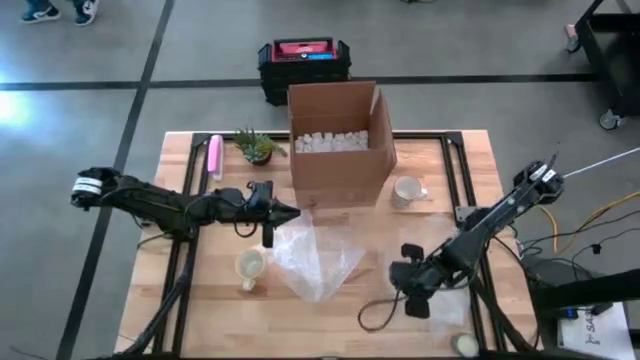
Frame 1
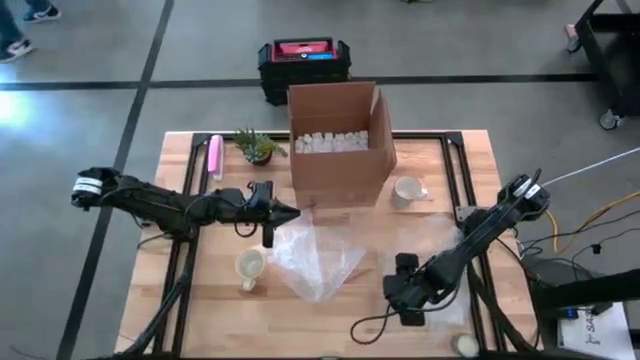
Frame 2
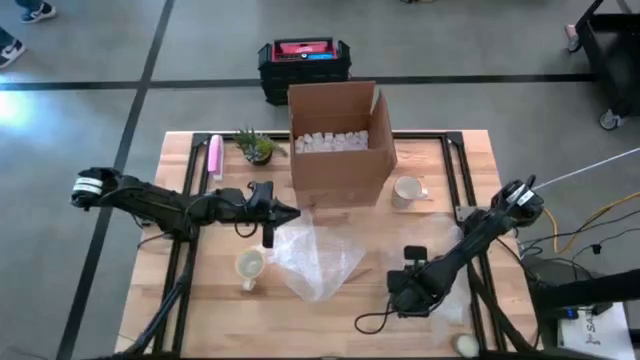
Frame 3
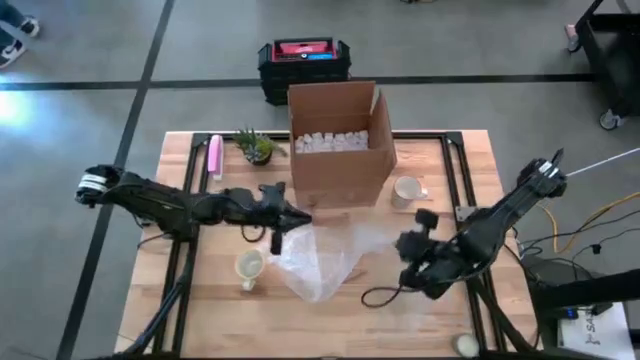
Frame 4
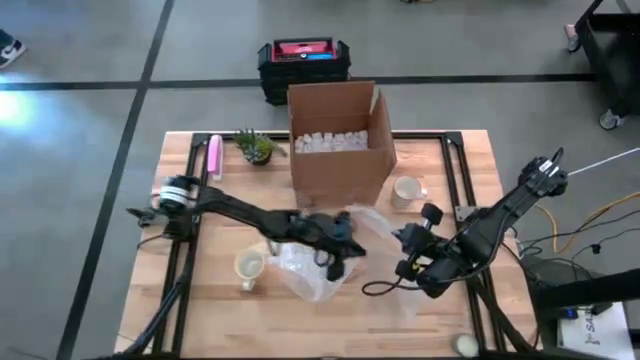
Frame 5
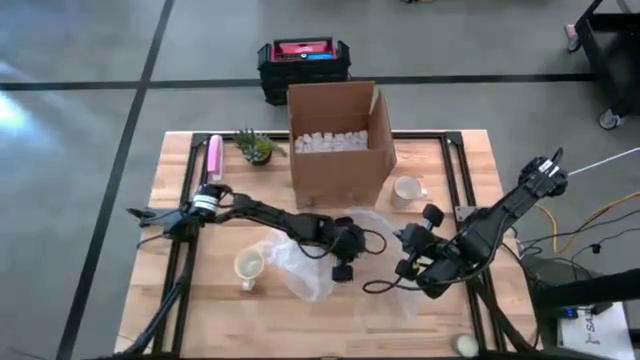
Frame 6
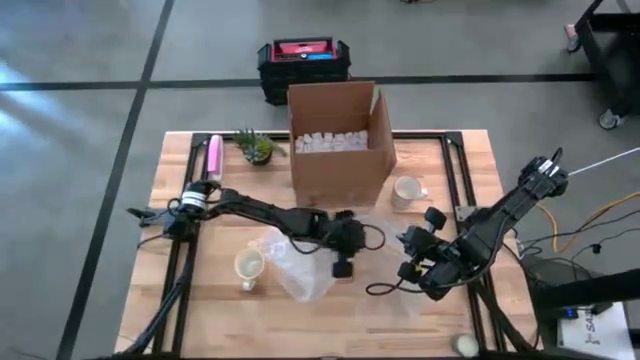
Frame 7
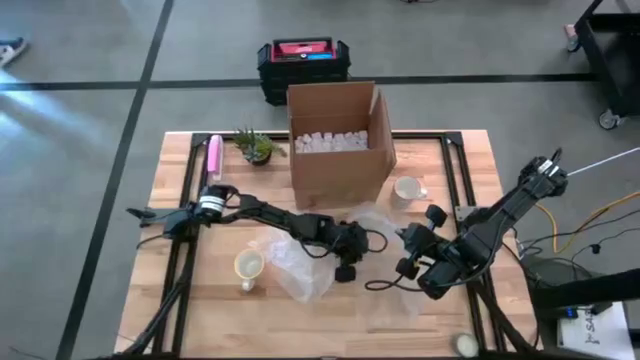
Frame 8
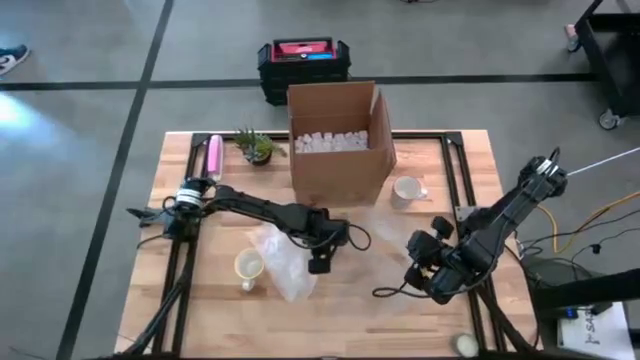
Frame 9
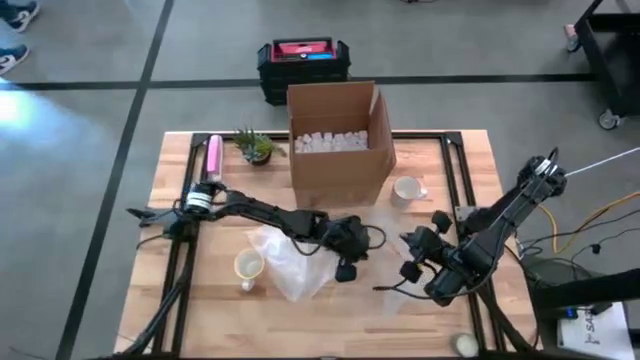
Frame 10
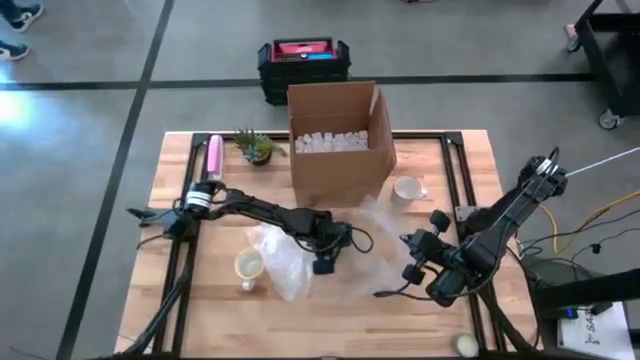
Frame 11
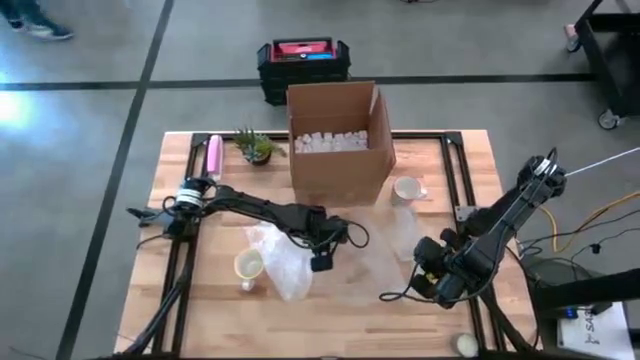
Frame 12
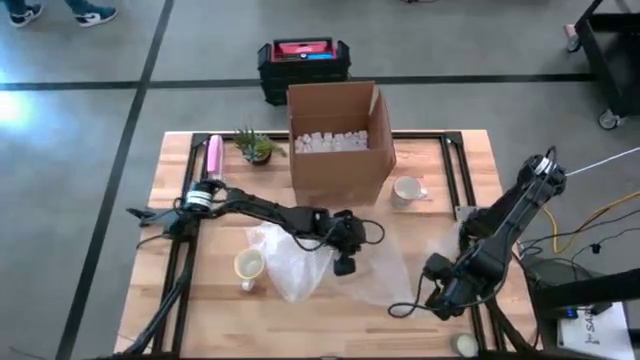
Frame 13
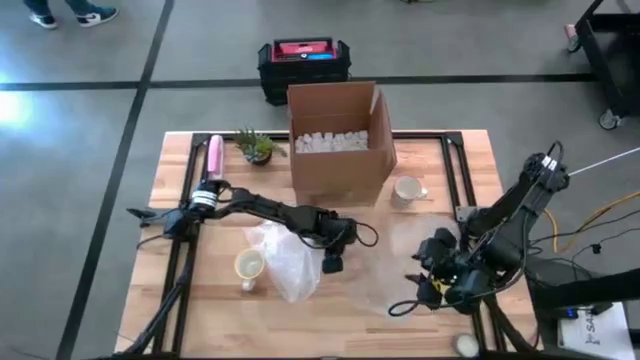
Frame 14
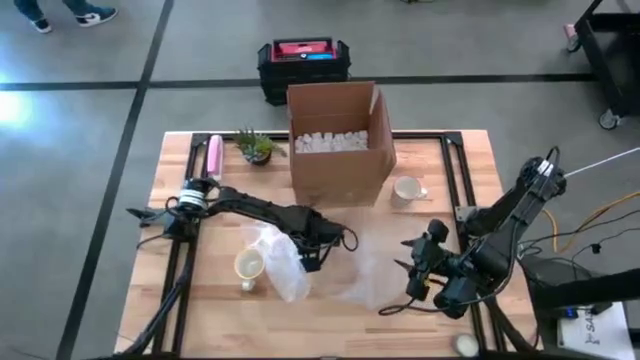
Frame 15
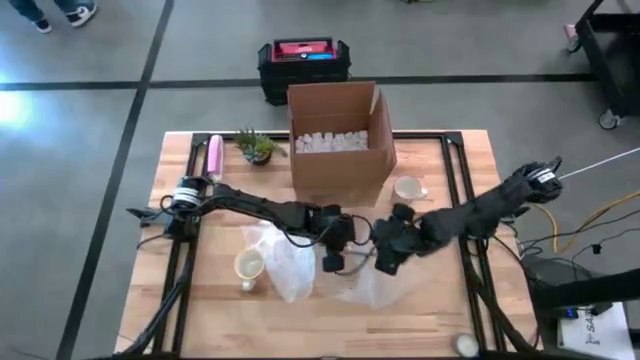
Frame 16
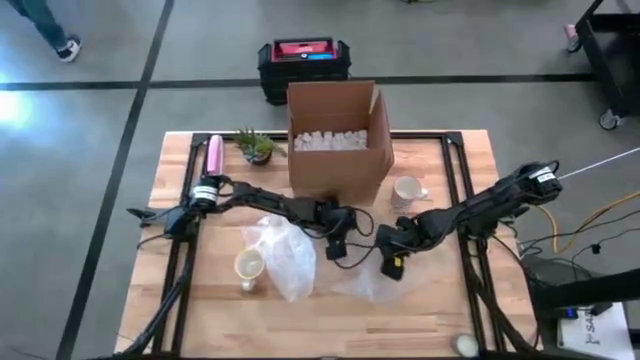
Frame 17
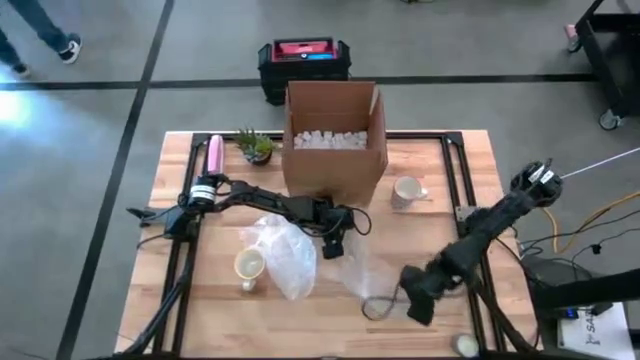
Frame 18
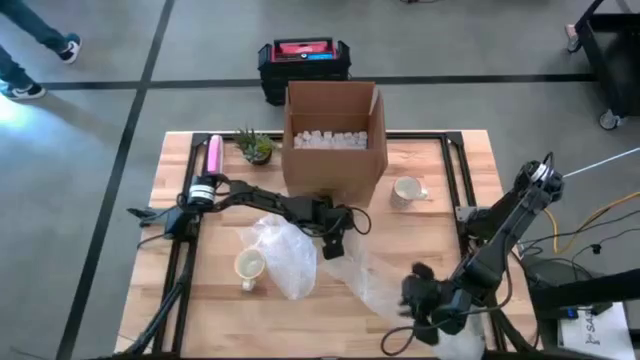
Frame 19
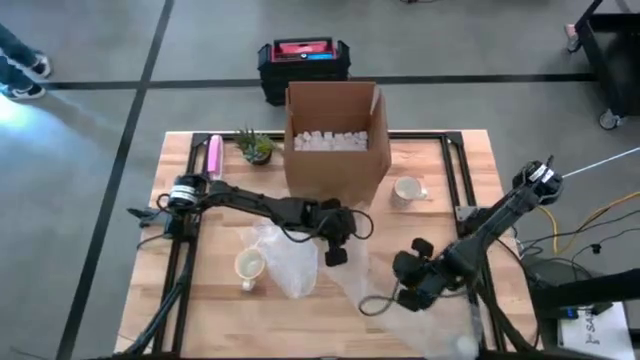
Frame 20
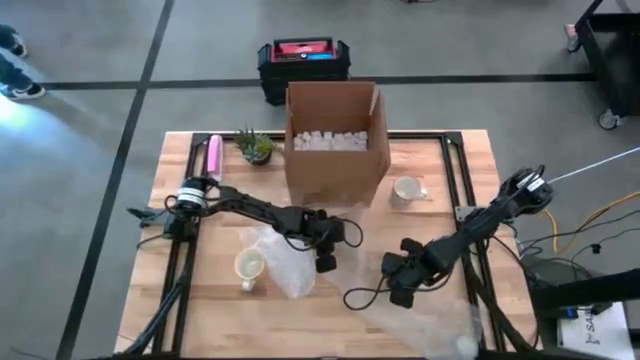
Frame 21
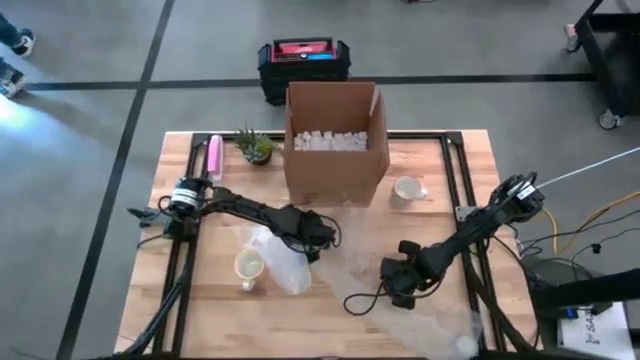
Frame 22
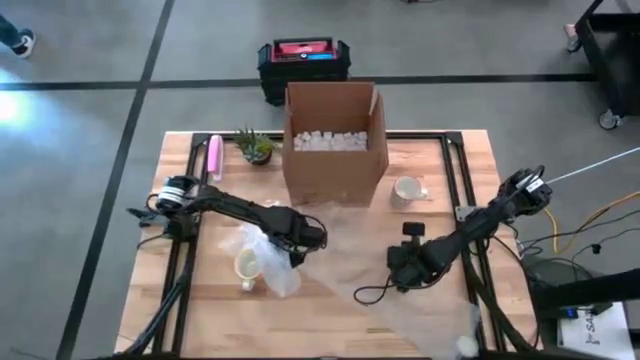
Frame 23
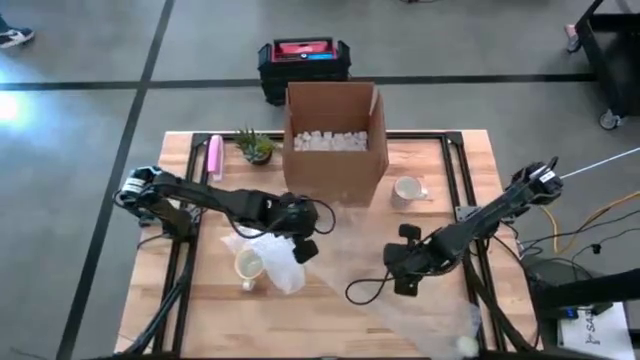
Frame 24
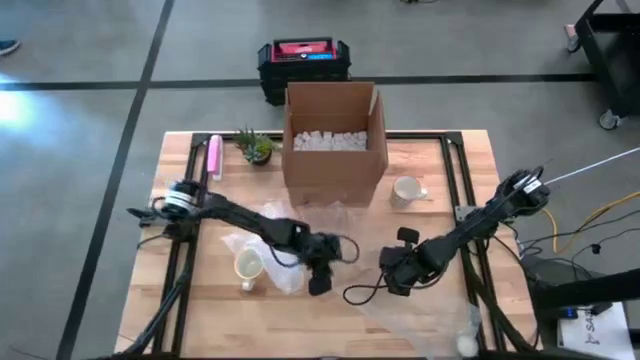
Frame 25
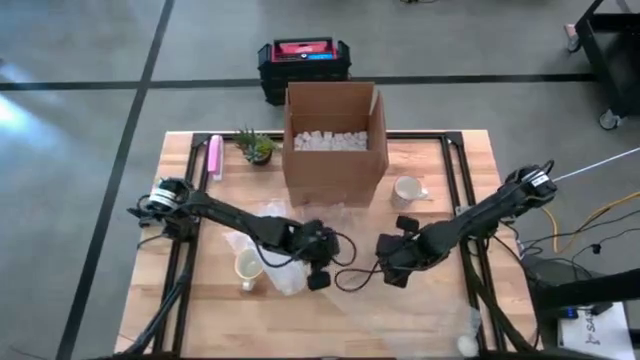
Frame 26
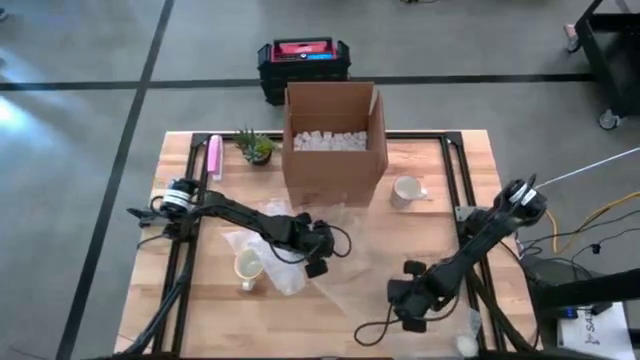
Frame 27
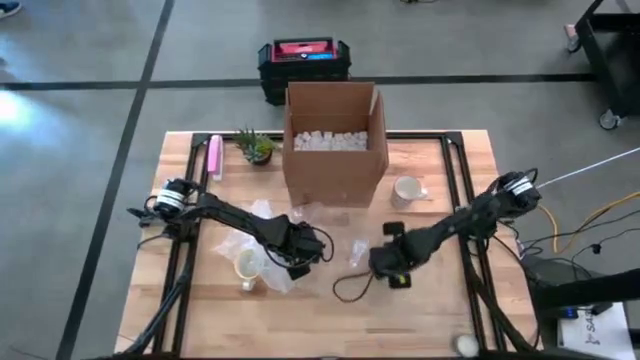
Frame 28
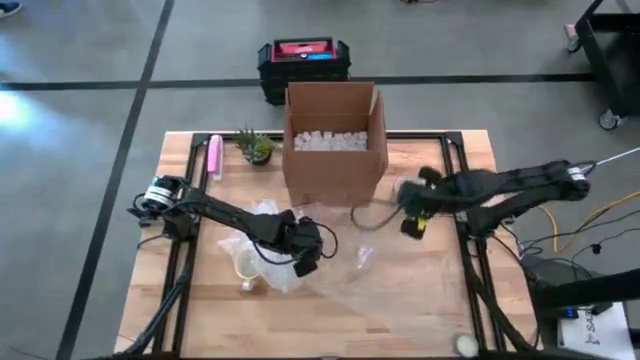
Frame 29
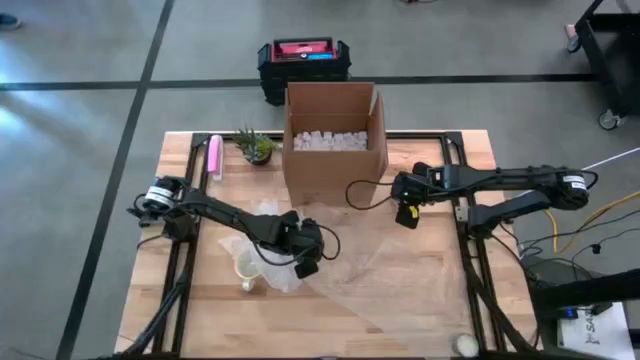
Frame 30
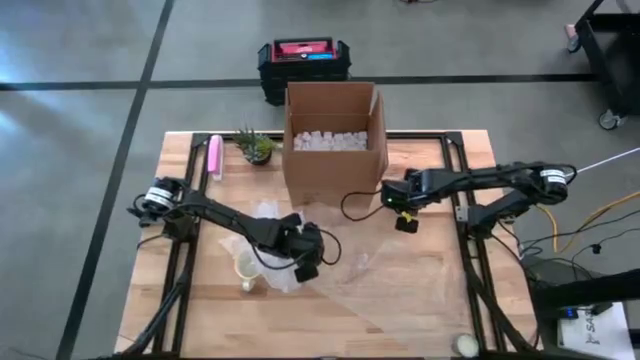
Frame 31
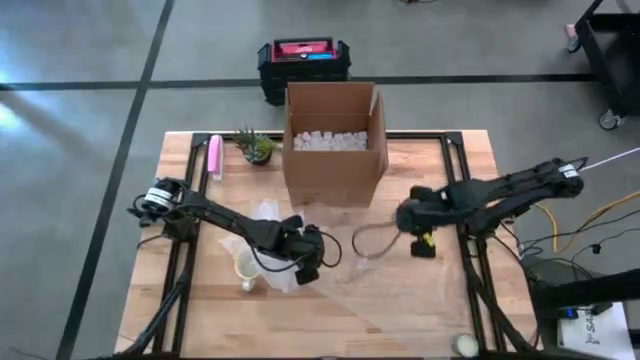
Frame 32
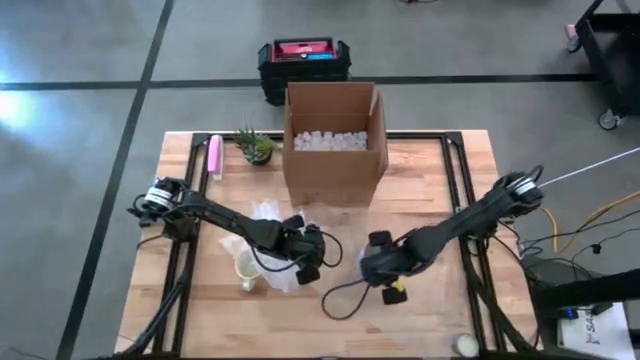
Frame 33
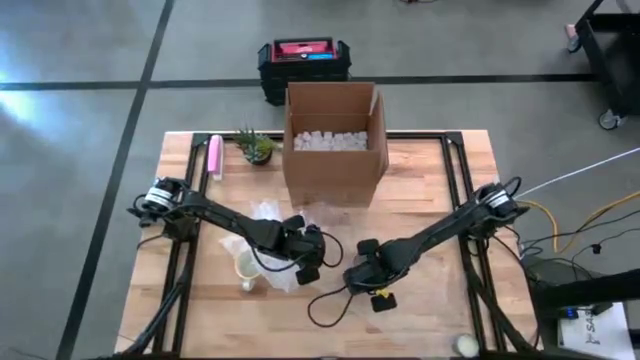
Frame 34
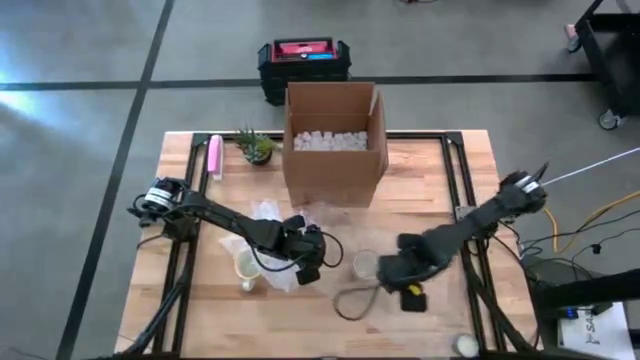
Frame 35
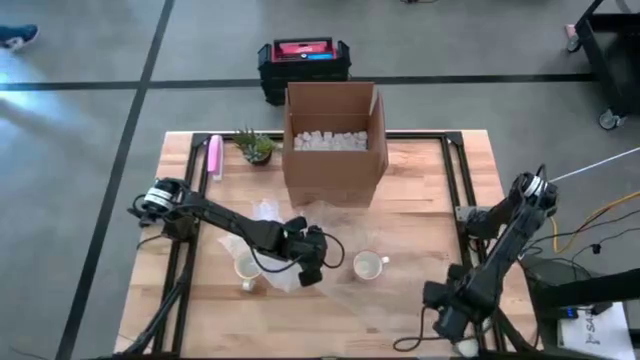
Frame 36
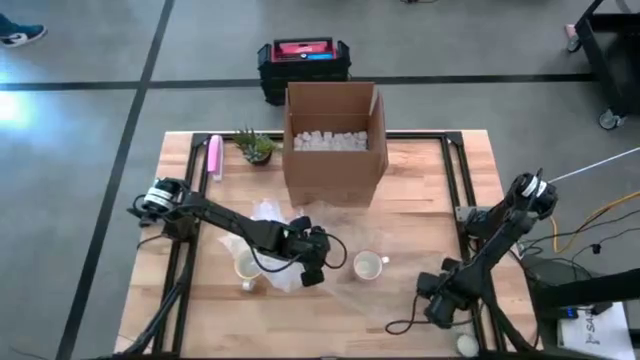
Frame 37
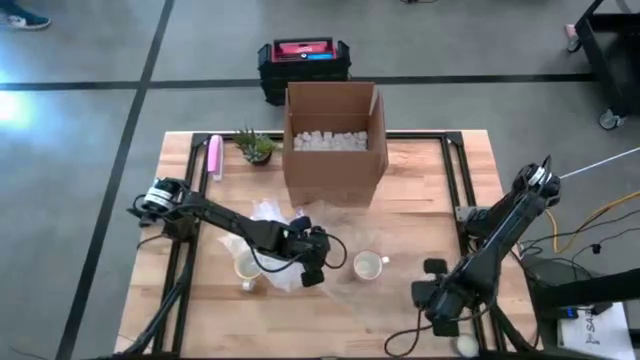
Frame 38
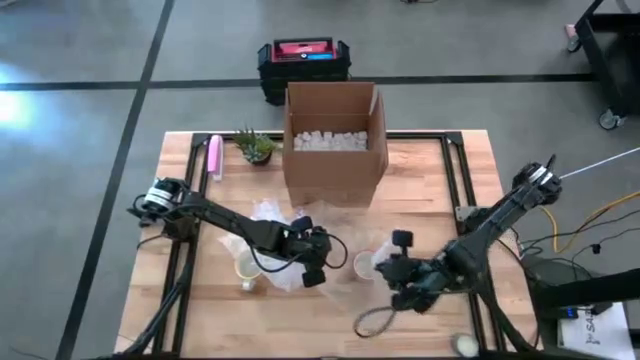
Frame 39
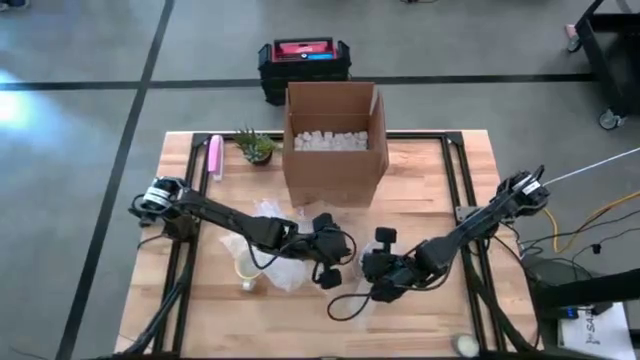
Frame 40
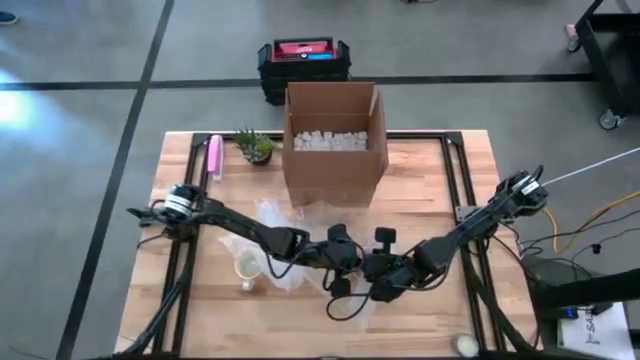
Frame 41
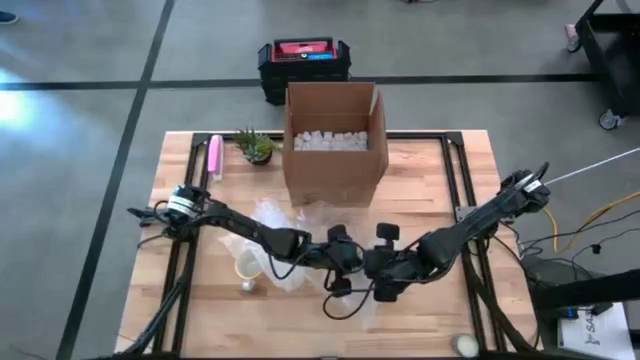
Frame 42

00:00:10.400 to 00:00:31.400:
Task: wrap mug
Wrap the gray patterned mug using the right bubble wrap
